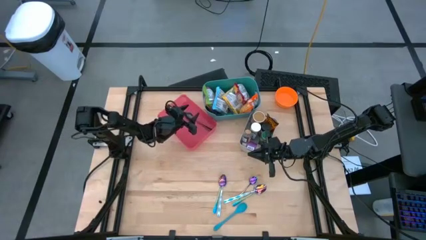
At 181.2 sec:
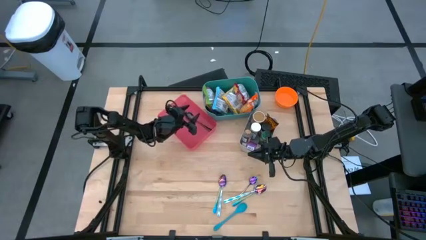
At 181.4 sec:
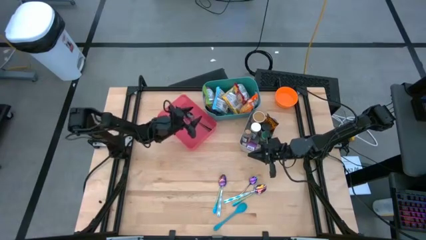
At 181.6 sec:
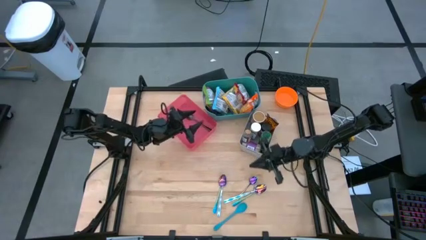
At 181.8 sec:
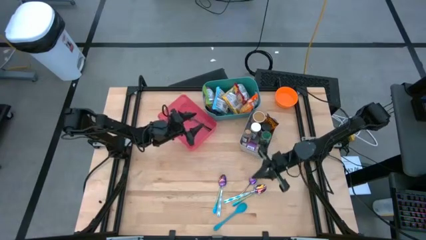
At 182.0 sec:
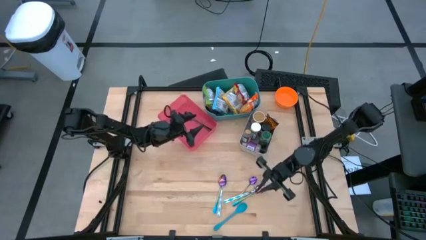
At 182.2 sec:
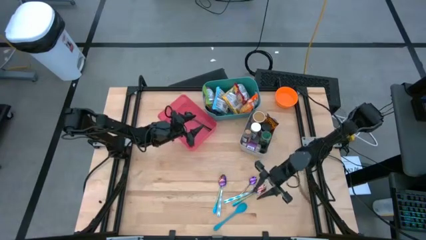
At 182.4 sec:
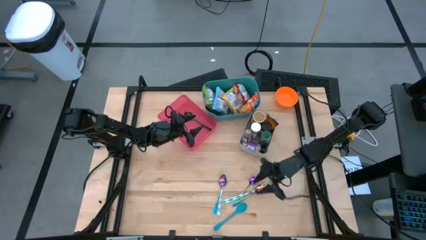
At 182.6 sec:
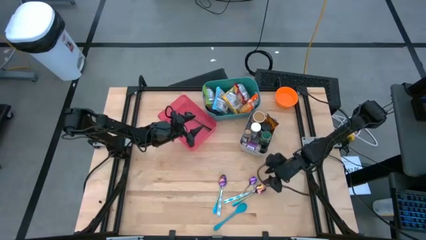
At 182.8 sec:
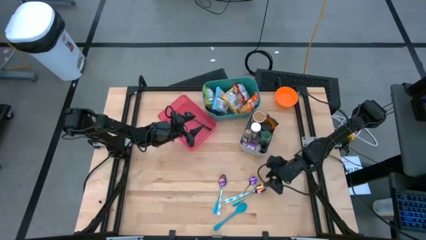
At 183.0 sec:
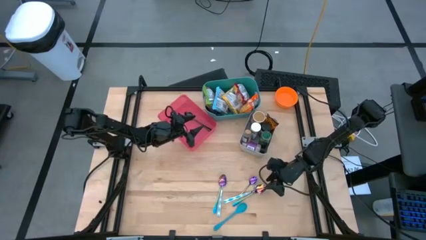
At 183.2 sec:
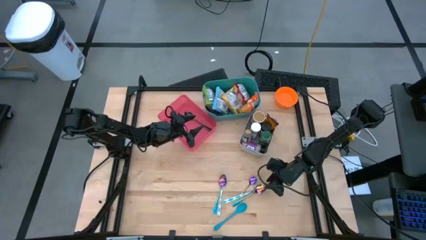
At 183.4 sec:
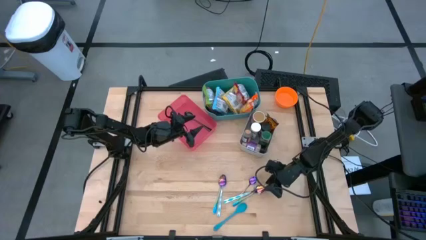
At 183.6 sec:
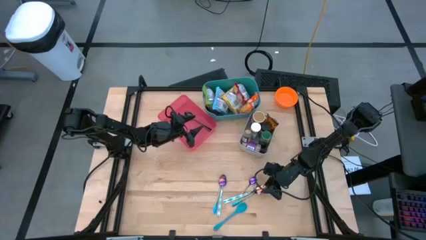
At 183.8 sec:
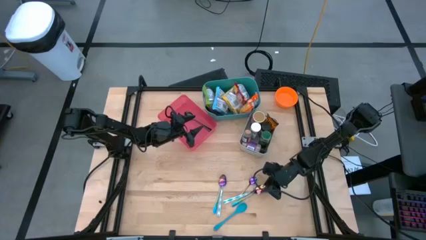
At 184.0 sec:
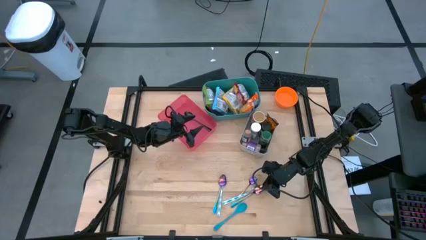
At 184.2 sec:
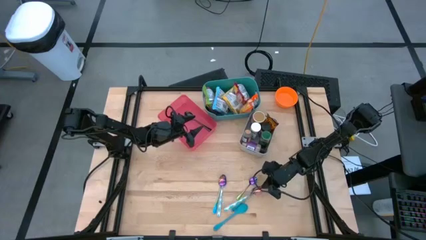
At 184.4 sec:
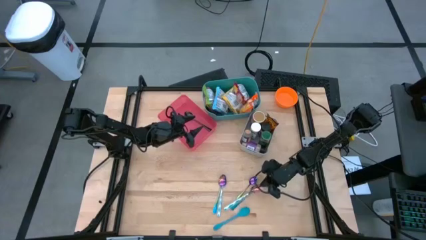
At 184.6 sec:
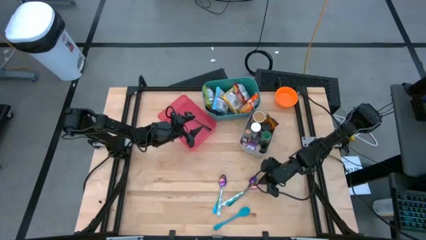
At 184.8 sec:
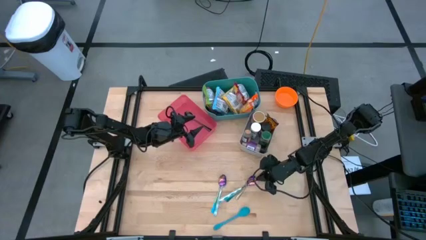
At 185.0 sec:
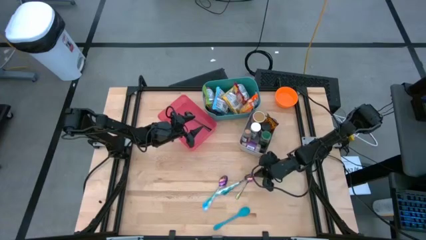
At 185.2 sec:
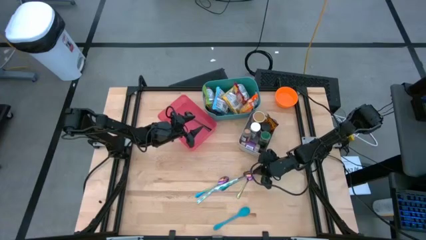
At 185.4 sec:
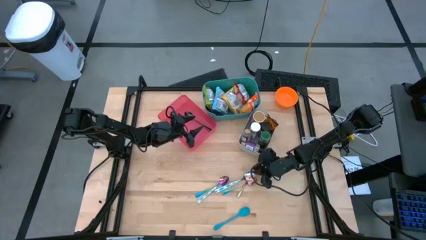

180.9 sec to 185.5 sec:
Task: Pick & Place Food Item
Adjust the spoon on the table

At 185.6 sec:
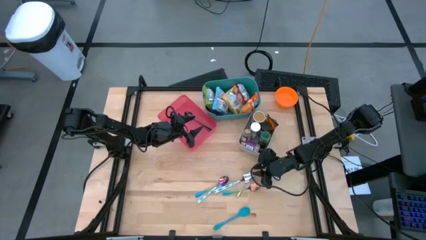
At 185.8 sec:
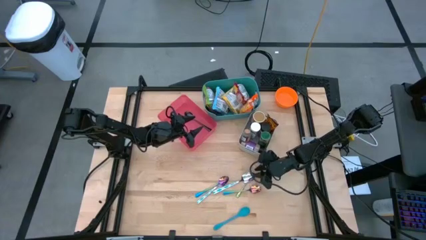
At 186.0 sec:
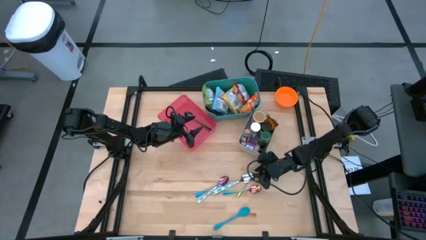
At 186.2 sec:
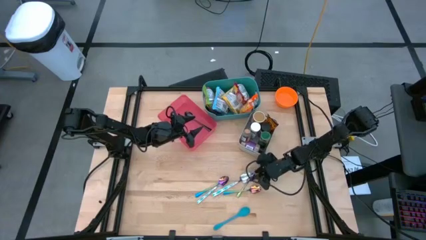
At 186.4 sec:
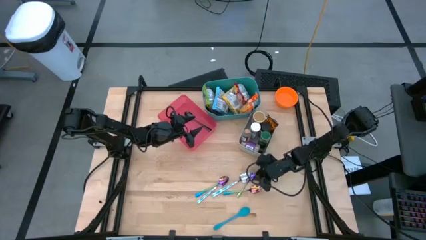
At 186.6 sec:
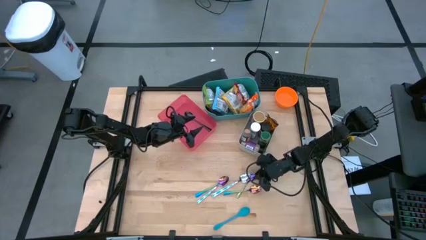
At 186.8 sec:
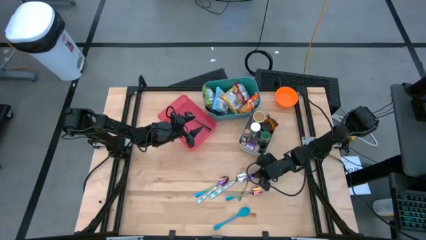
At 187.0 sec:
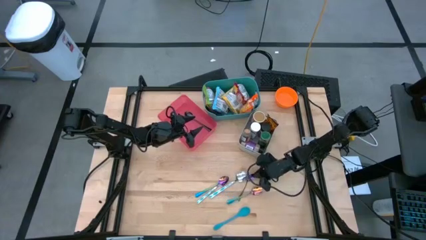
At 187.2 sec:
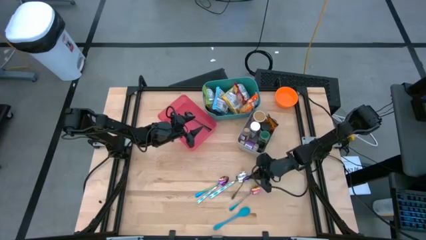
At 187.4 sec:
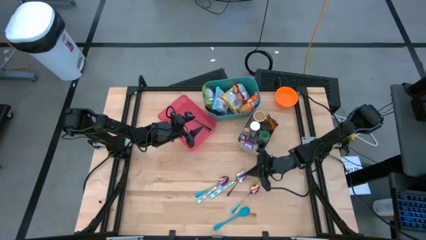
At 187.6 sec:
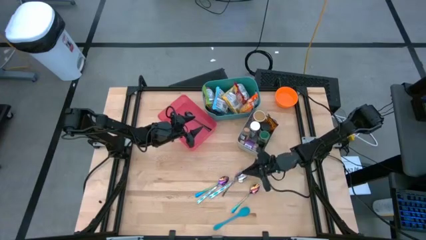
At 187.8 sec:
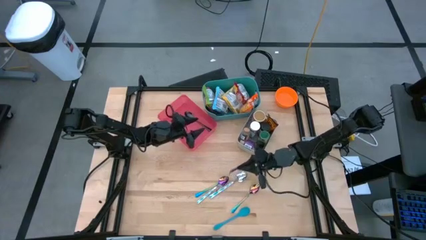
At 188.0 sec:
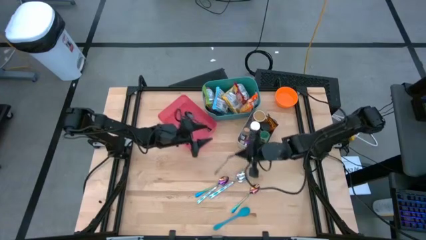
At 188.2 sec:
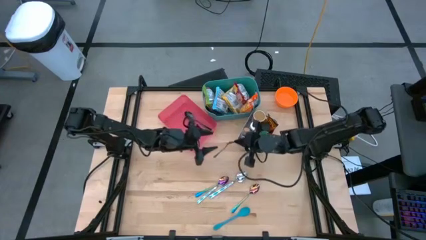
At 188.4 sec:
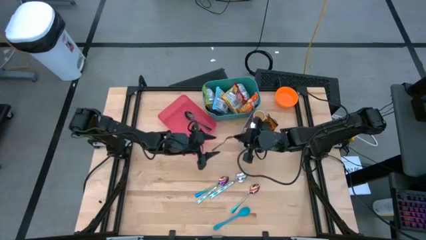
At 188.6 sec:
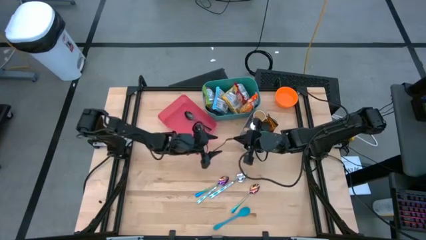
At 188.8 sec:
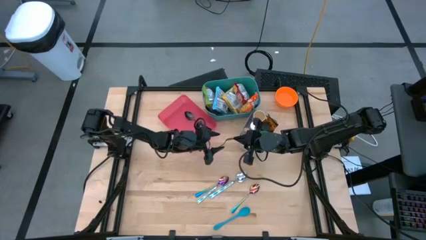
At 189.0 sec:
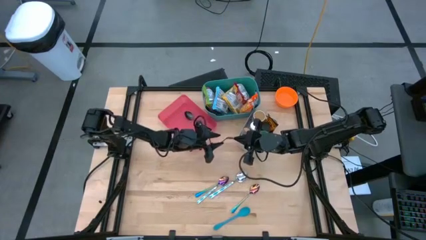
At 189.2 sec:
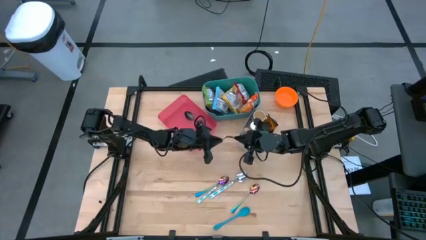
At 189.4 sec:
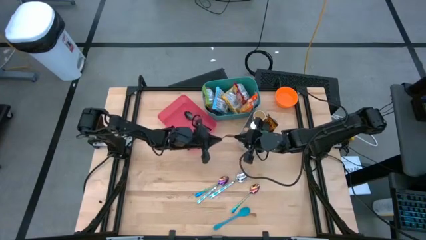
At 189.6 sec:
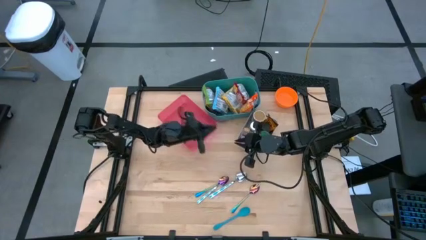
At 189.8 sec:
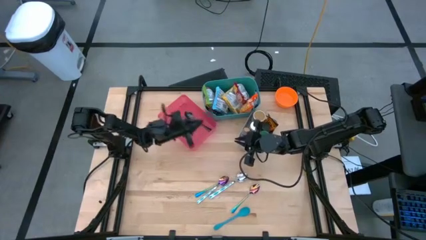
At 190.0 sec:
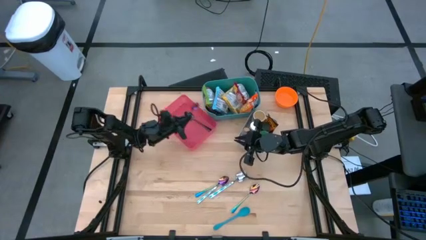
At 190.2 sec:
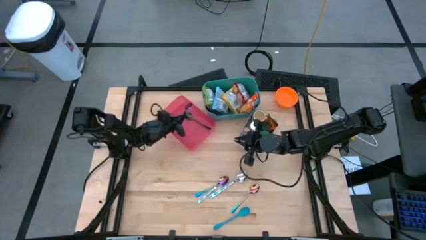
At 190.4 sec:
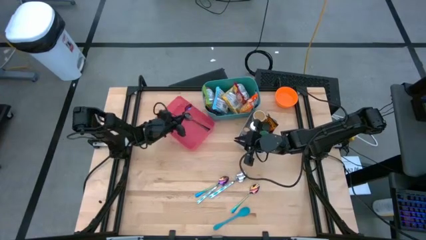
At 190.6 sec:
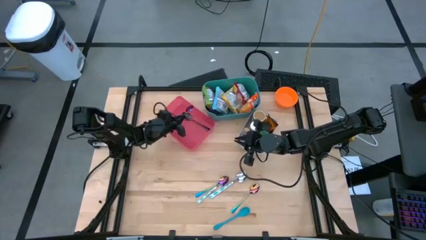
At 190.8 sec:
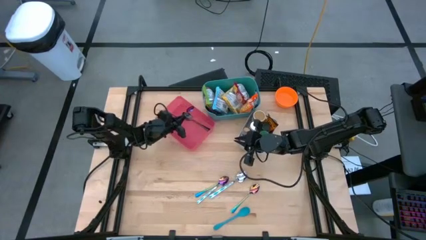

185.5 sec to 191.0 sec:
Put the purple spoon into the red bin

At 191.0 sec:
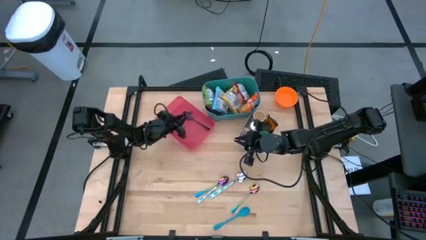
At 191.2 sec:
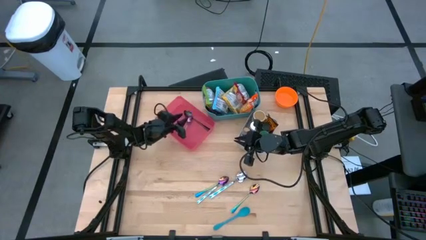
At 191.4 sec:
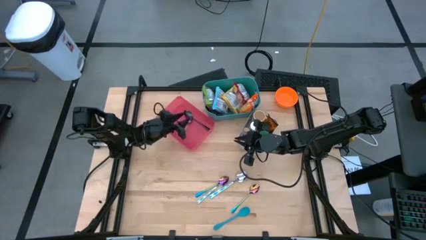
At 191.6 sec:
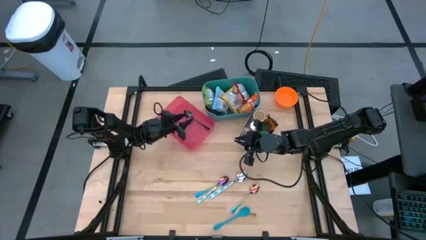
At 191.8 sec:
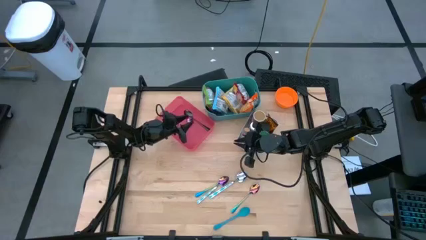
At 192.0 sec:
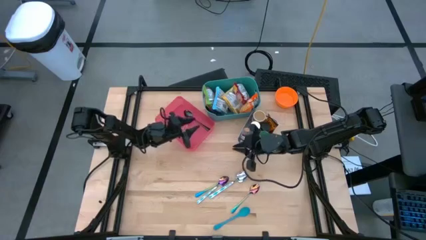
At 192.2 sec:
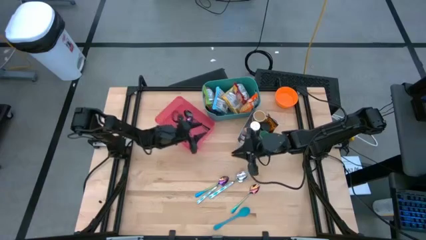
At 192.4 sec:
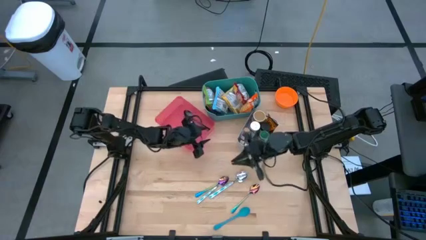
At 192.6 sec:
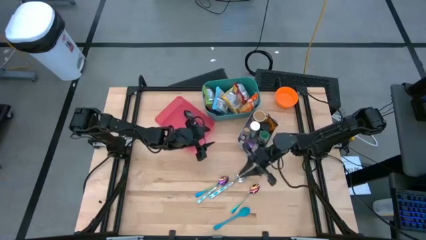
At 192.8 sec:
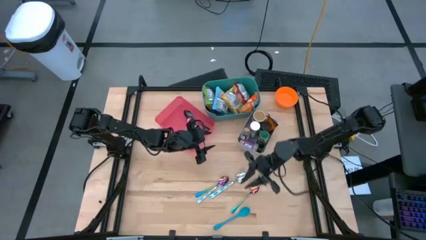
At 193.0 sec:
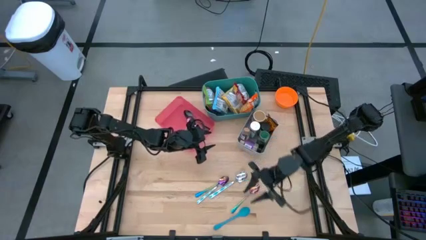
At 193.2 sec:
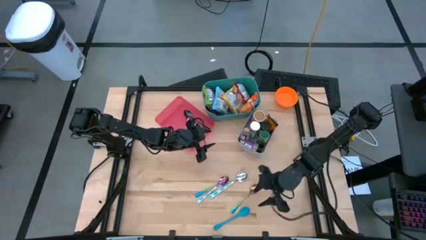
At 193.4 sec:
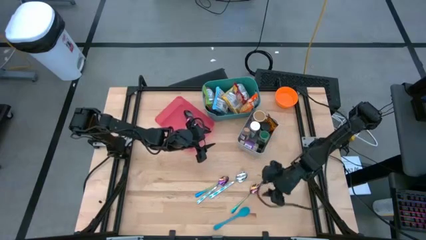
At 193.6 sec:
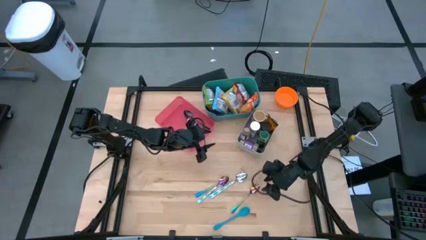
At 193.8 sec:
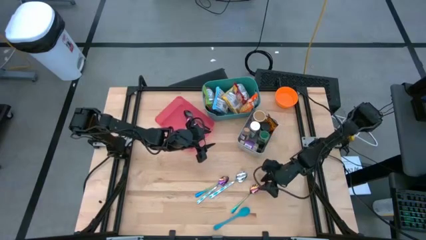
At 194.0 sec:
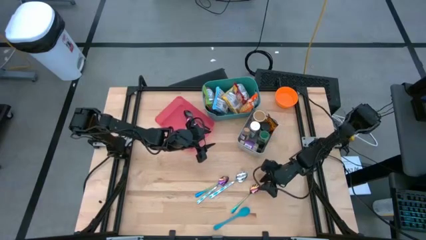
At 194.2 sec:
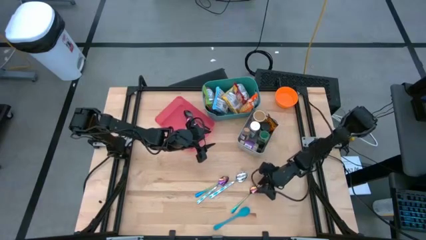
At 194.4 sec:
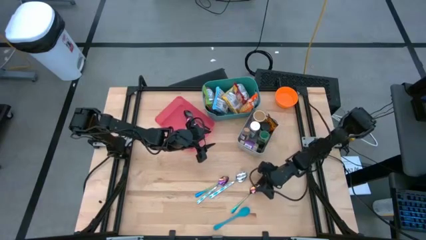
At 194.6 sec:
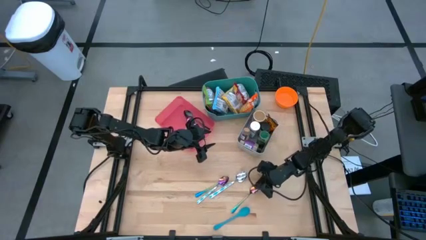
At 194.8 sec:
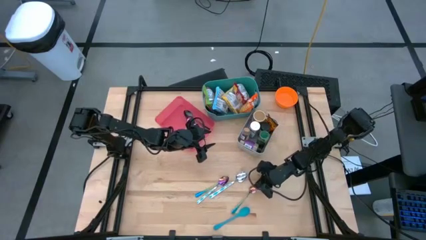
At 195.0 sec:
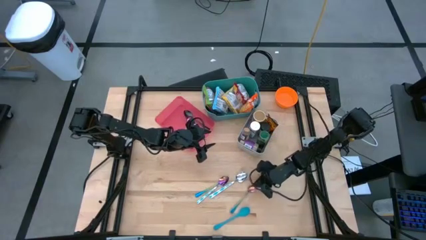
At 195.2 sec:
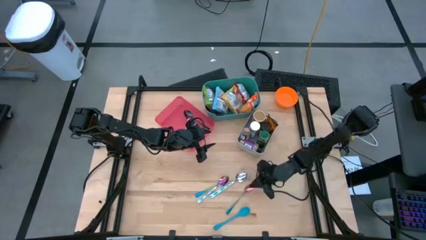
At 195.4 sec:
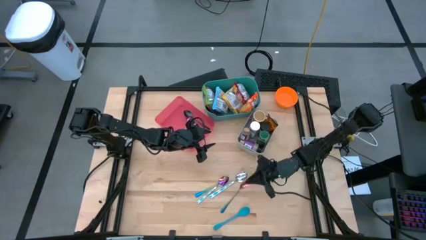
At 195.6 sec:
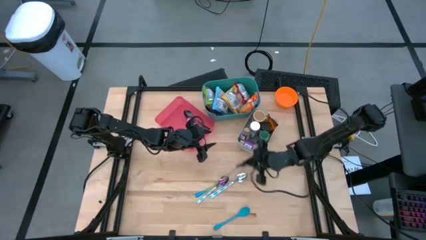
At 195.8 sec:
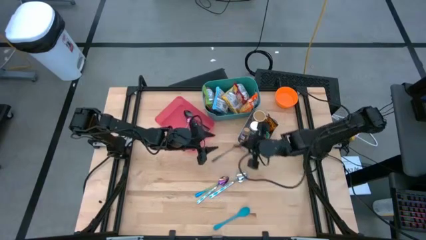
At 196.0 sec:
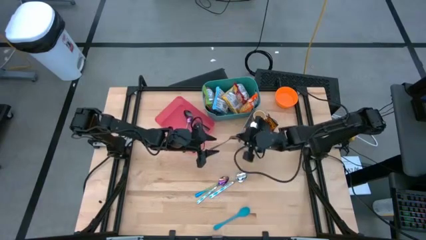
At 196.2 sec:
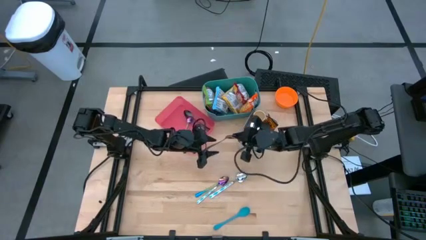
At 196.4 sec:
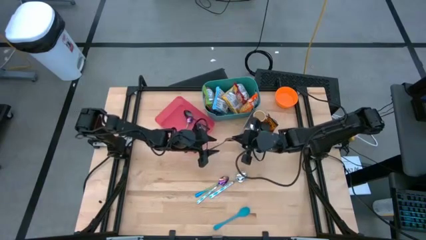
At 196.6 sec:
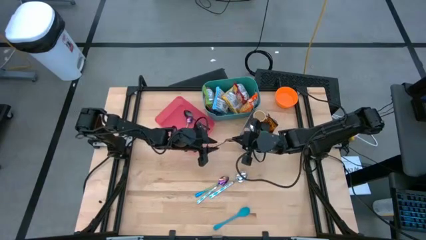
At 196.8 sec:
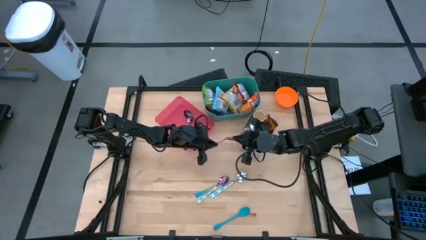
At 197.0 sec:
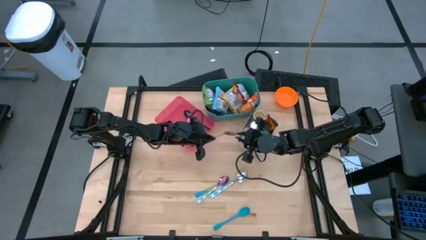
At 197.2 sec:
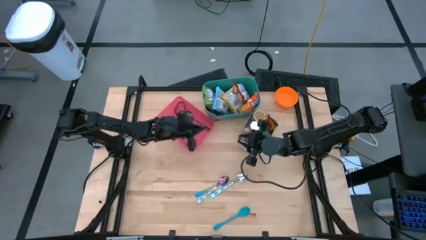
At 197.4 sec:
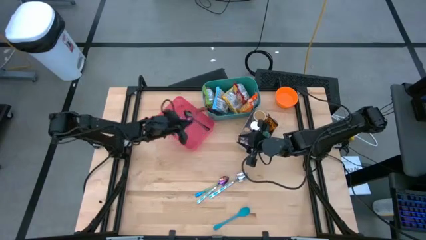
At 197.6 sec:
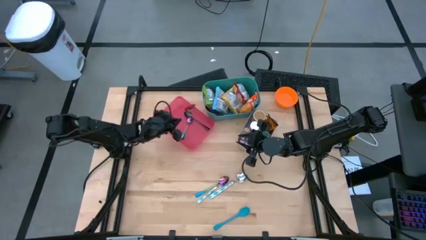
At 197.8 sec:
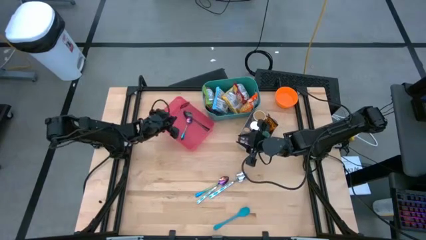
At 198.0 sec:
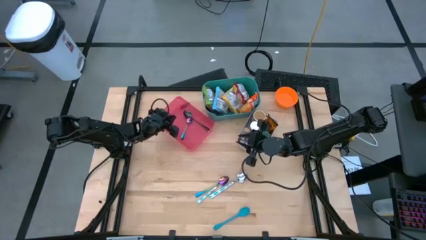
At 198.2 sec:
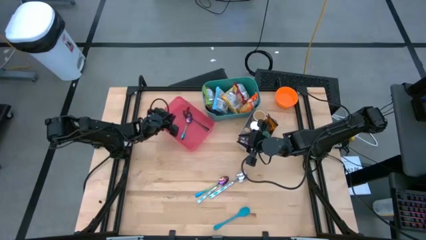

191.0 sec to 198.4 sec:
Put the purple spoon into the red bin
